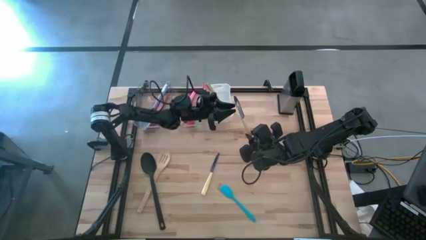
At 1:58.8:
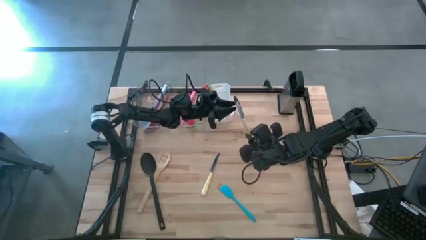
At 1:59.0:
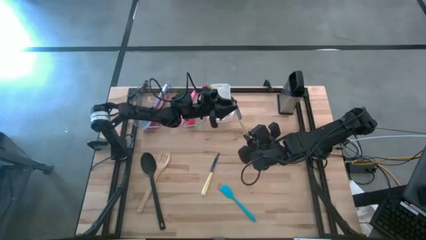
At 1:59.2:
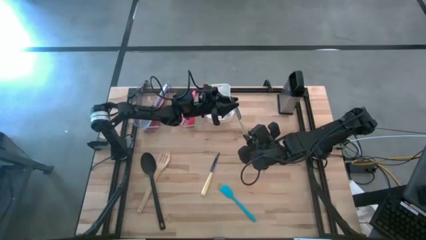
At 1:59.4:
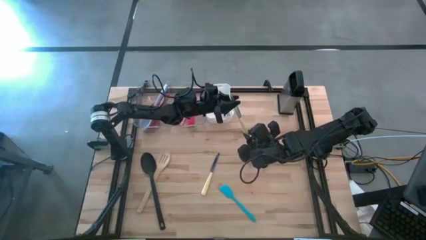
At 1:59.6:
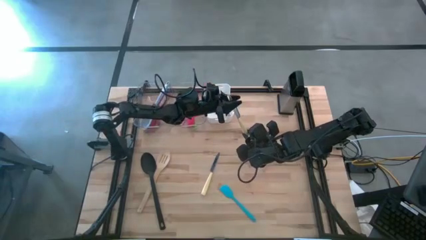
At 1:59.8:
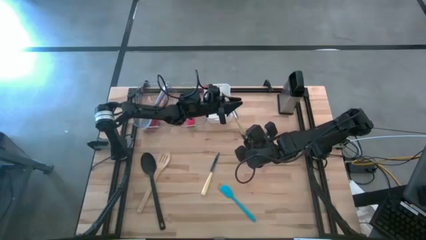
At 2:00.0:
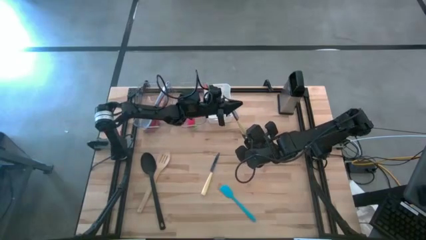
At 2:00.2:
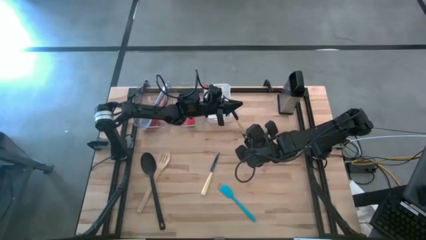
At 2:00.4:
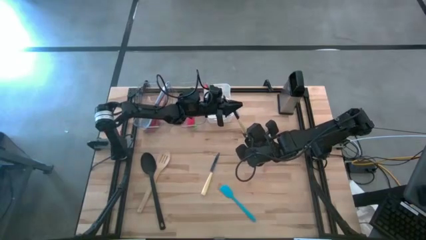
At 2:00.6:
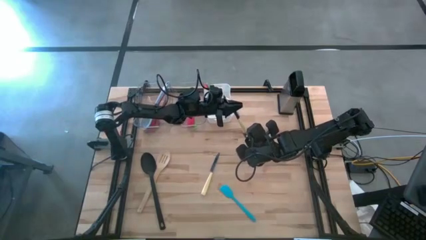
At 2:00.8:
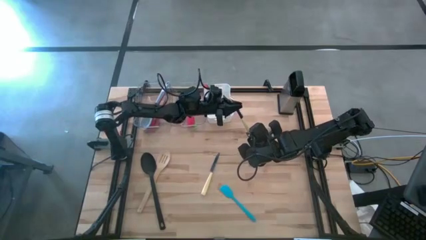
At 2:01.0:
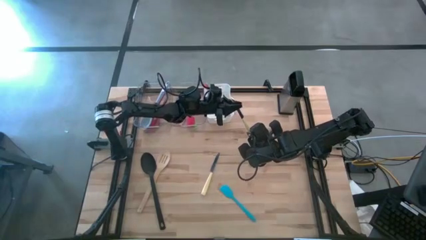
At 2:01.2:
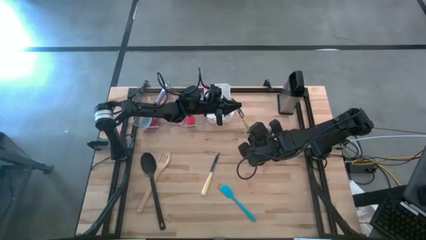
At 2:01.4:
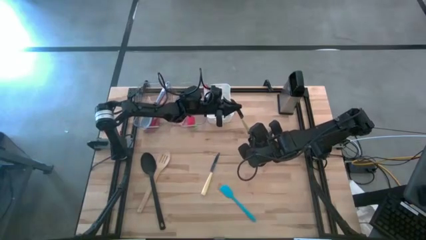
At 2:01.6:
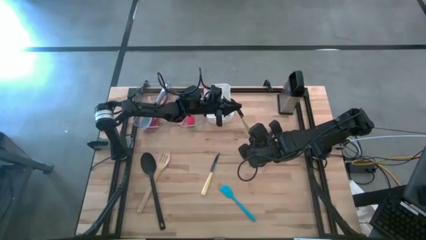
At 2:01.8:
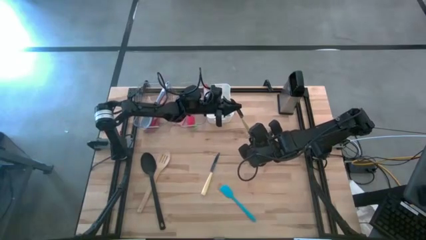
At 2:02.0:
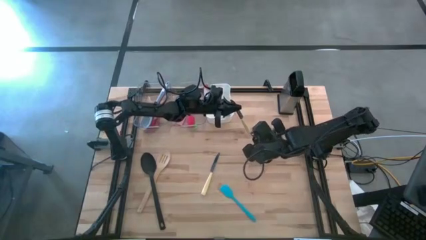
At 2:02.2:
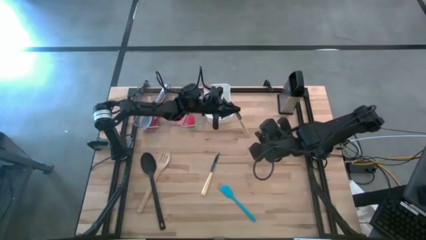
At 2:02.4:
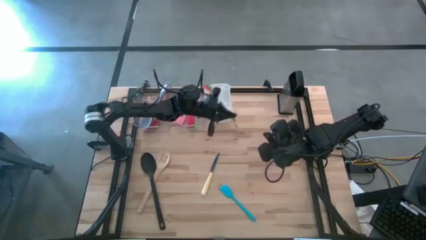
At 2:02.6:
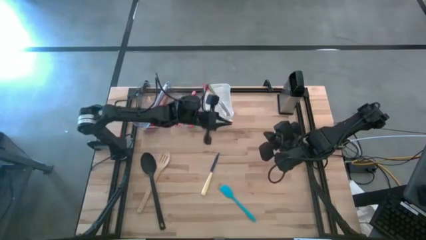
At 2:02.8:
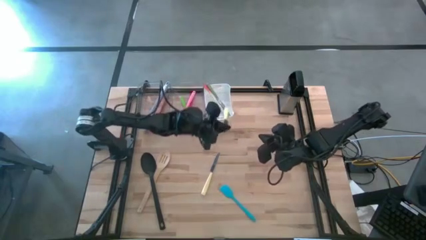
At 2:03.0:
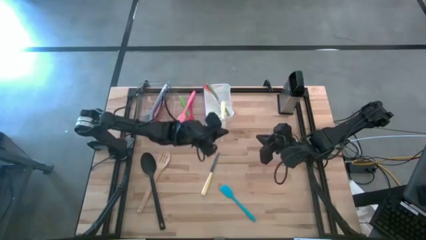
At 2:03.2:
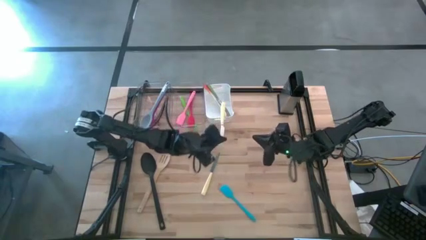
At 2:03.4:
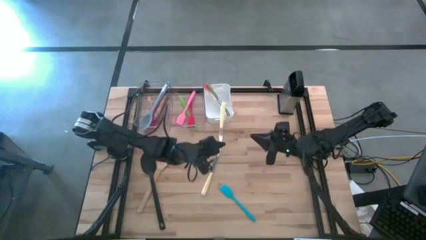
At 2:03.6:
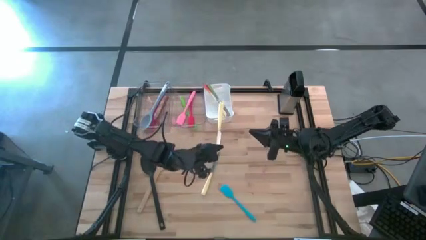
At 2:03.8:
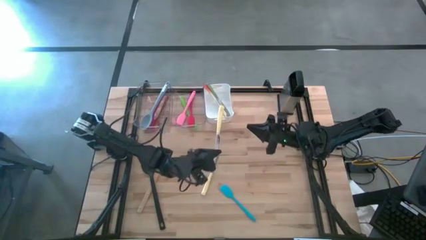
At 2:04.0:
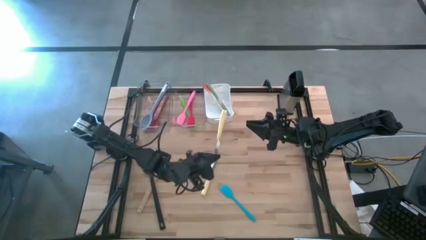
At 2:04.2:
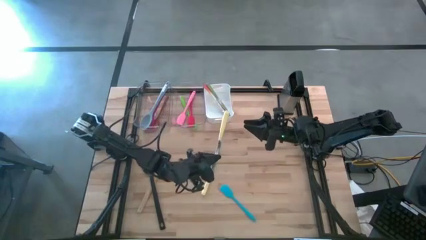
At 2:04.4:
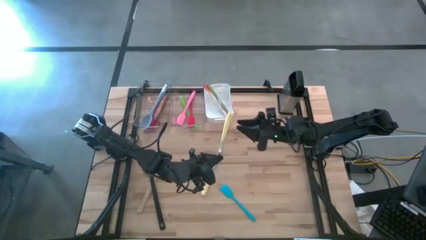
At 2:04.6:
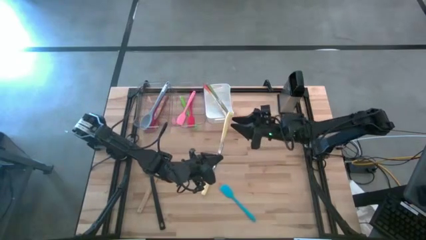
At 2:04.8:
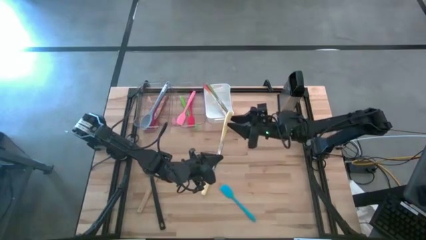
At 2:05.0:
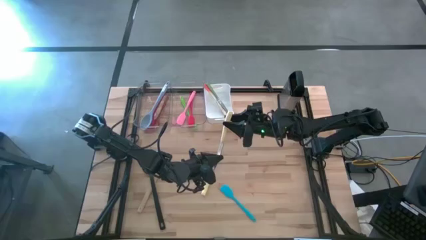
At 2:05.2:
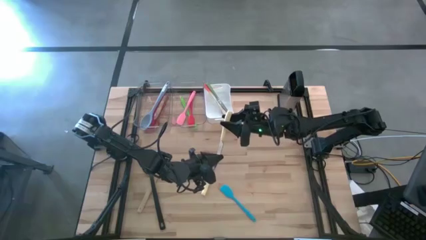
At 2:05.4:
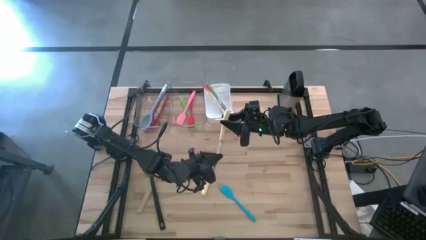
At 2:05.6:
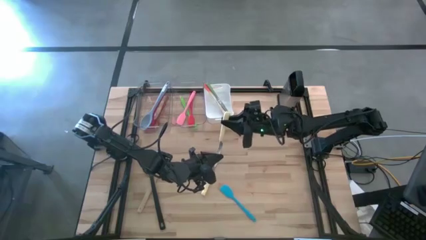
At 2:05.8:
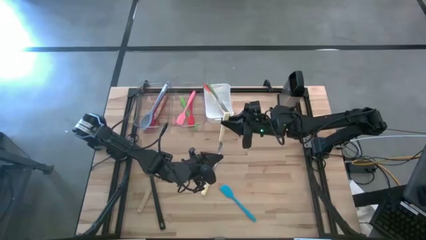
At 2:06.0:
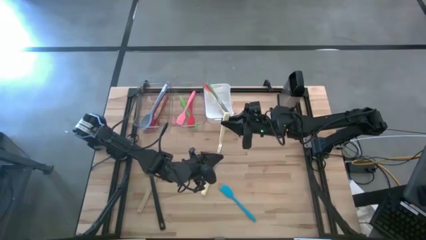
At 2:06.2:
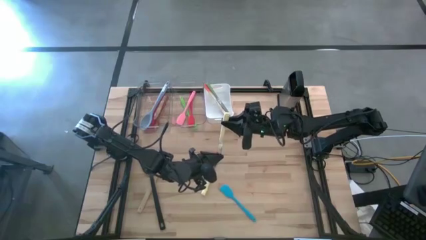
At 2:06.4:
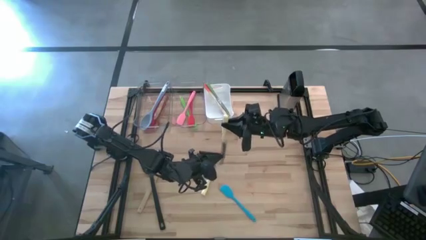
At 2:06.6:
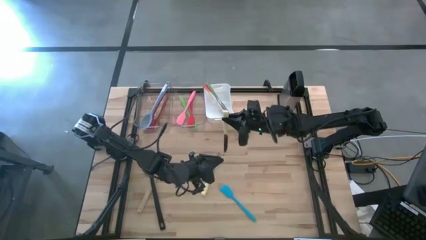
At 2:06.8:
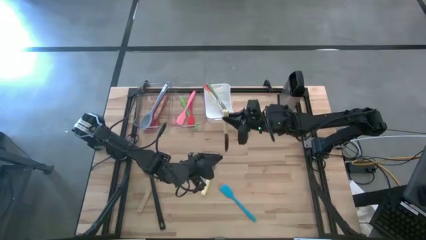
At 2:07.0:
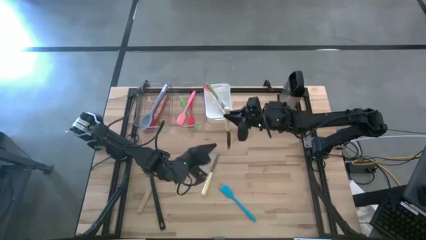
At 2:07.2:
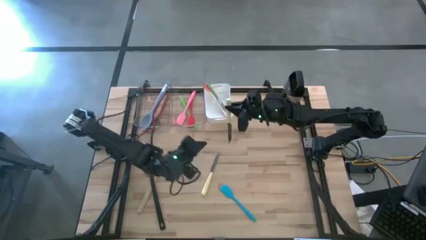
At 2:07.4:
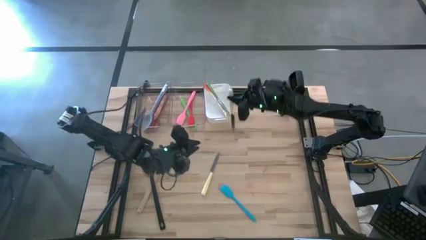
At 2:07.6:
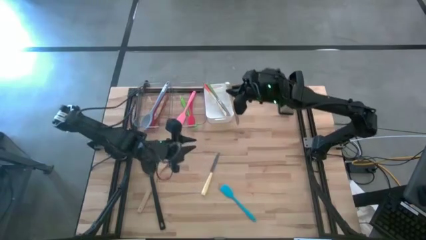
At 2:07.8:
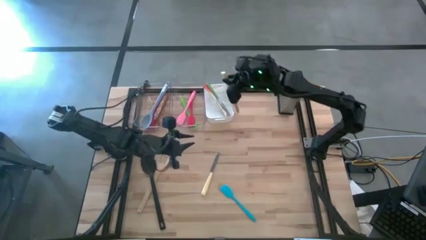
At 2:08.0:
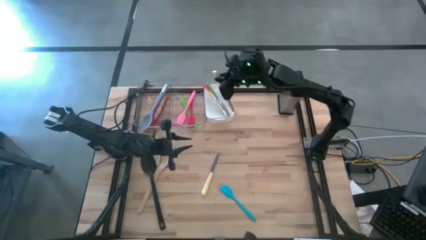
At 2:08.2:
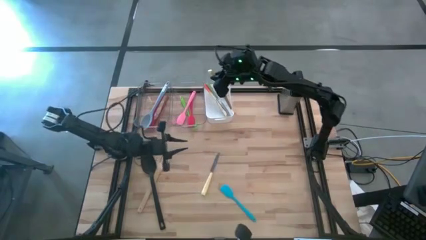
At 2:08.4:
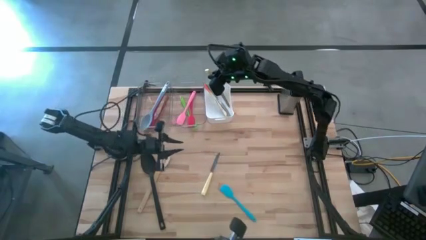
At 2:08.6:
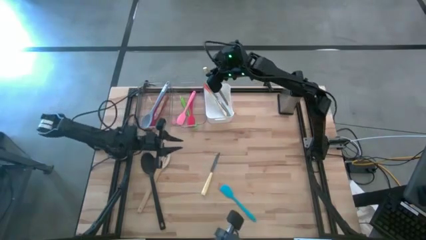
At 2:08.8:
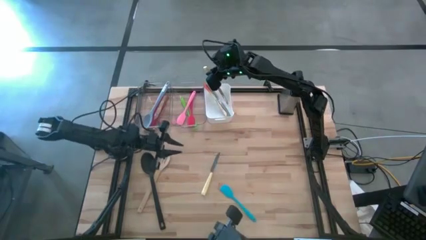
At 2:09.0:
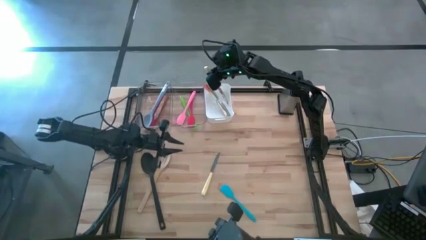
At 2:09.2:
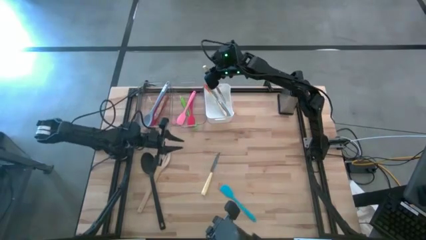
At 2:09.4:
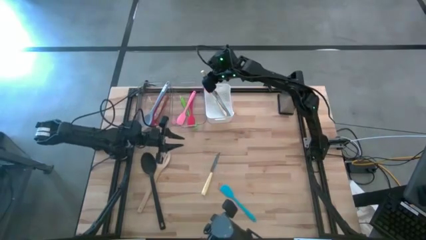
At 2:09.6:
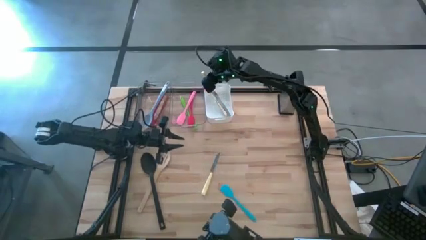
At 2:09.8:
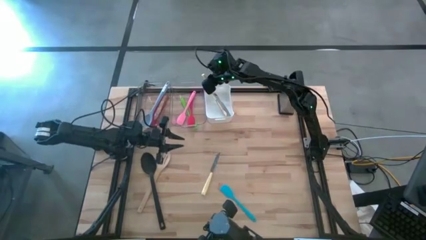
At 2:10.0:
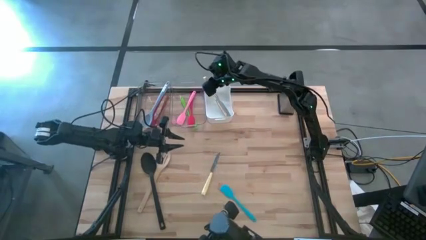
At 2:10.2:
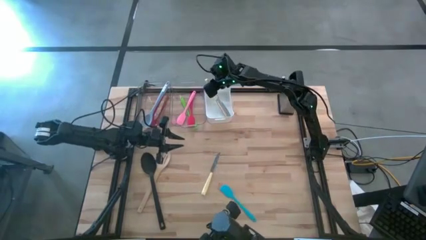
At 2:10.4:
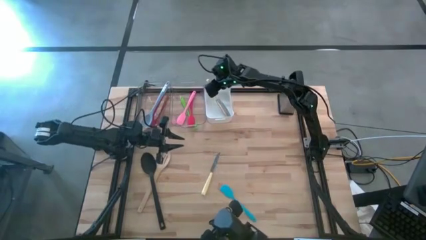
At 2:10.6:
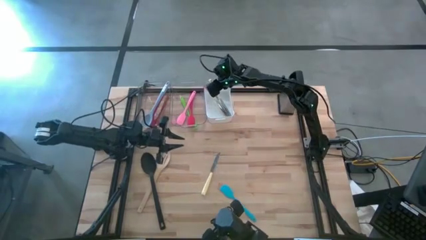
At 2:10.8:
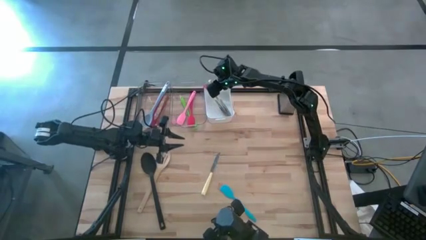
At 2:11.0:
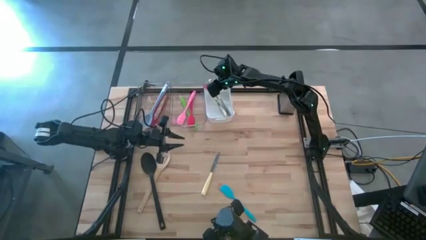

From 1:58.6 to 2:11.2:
Task: Pick & Place Kitchen Items
Put the top yellow table knife into the white bin

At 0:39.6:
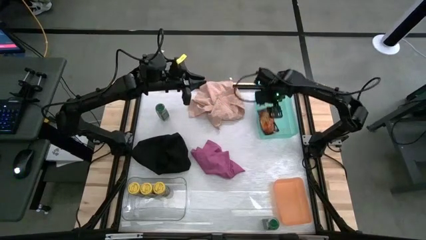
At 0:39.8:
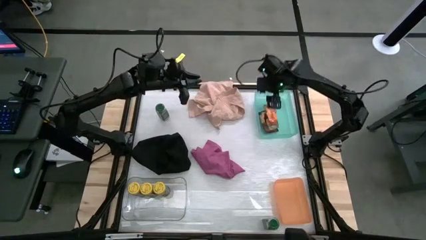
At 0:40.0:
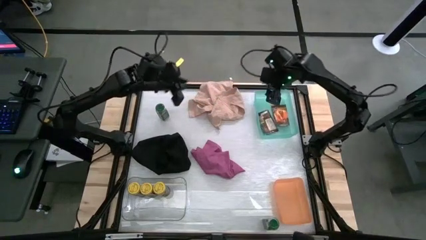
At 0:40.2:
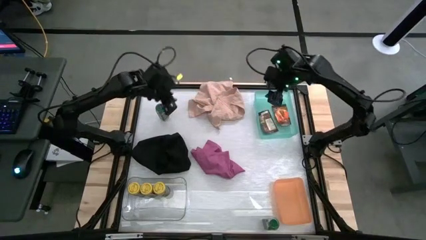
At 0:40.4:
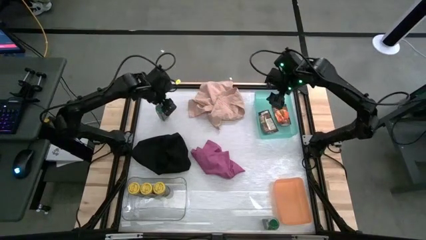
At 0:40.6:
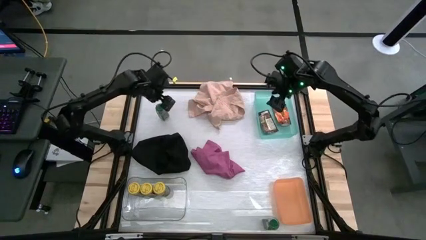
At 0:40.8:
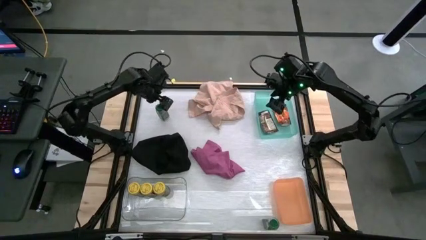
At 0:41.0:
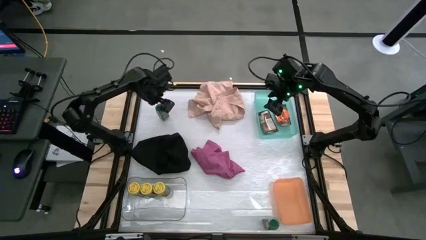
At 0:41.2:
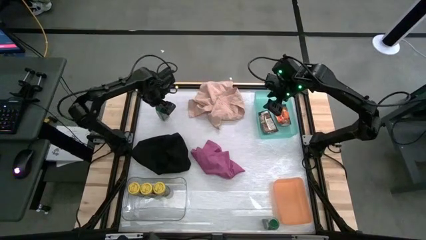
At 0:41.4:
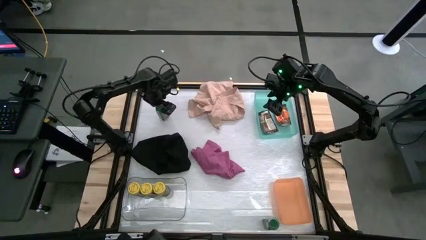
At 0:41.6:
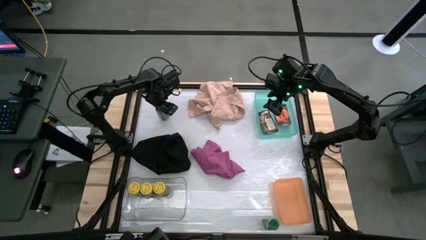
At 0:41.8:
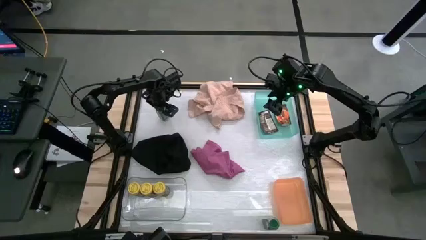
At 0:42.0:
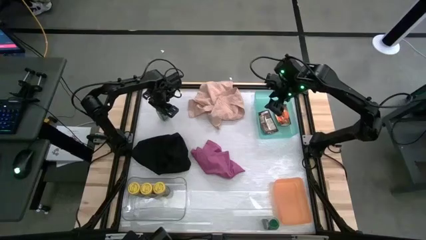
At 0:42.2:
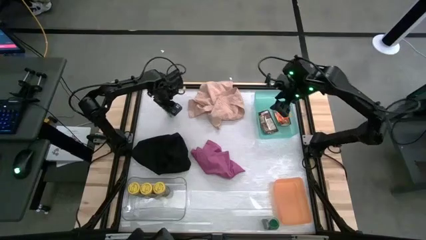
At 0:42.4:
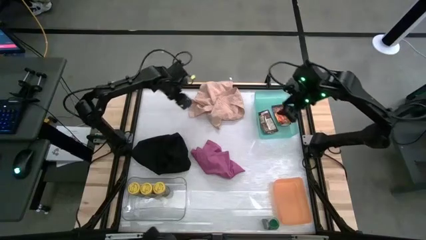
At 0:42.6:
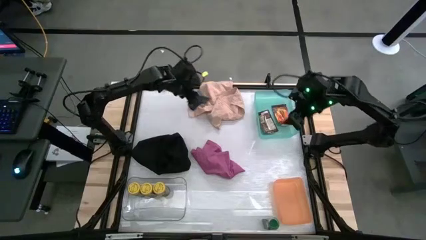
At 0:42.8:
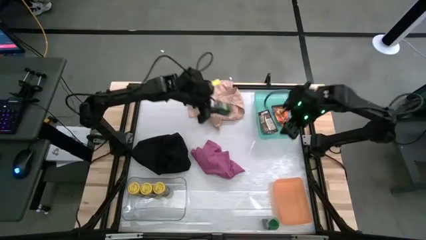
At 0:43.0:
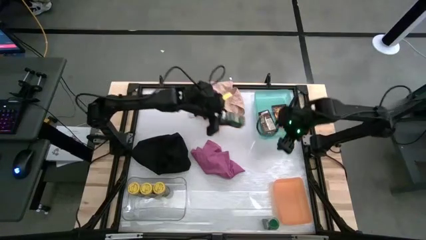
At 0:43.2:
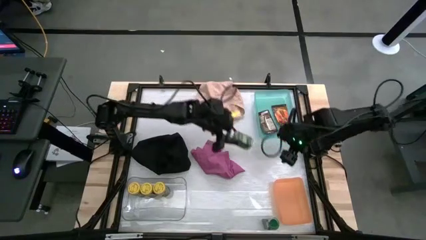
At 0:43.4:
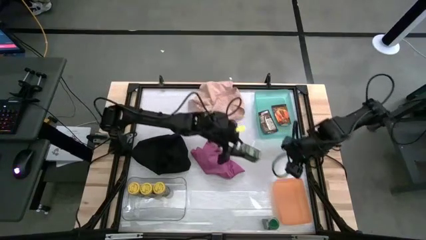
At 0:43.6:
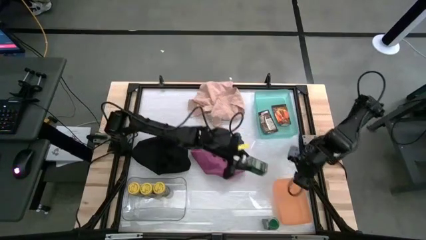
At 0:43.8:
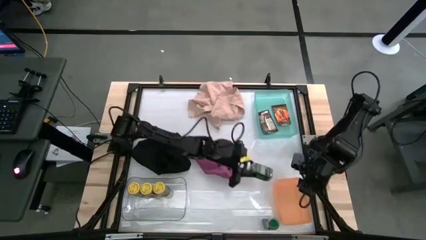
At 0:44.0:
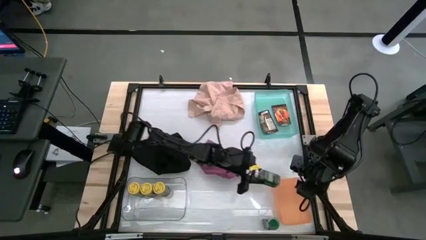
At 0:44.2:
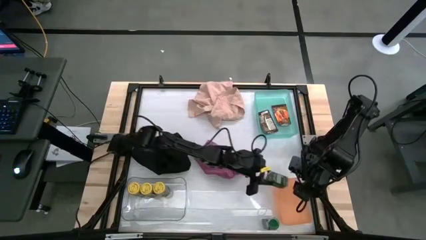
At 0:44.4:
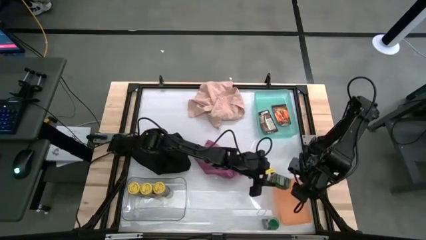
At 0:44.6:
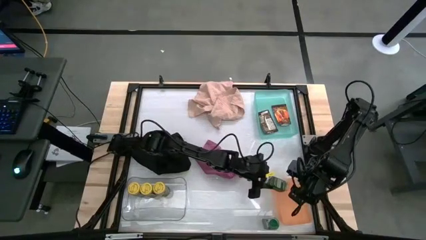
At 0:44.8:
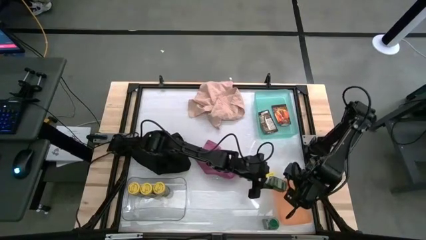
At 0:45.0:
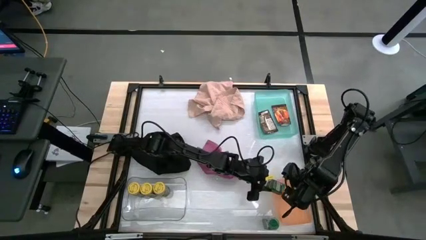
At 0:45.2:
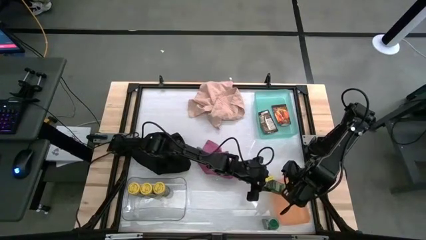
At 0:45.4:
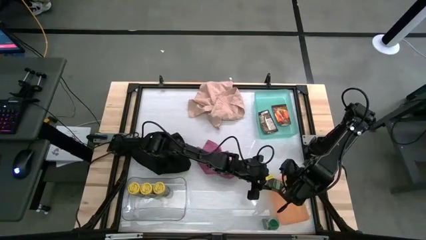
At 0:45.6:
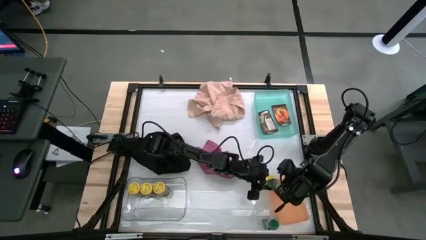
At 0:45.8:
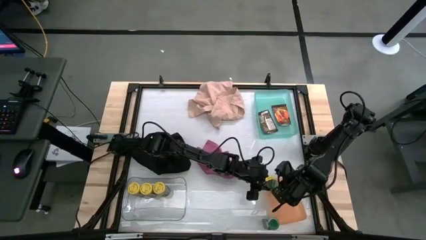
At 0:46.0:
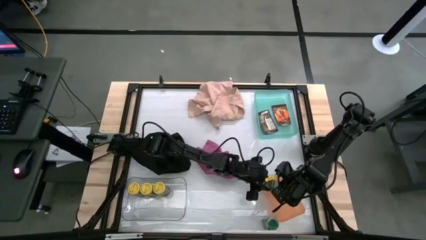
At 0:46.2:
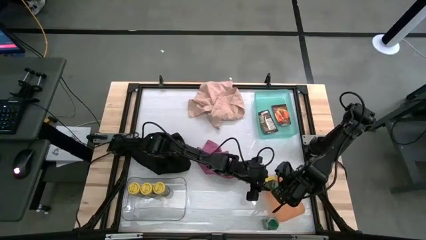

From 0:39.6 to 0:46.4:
Task: Sort spices by type
Put the top green seasoning bottle into the orange bin
